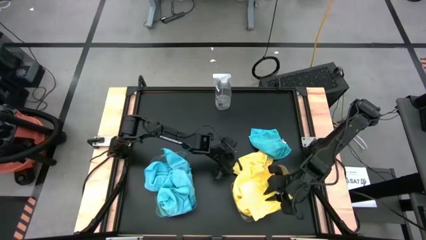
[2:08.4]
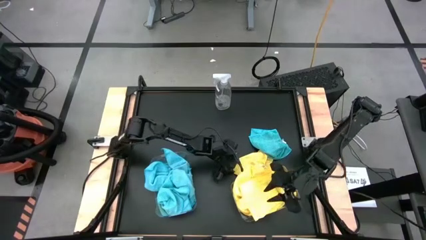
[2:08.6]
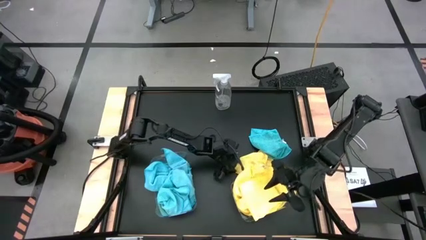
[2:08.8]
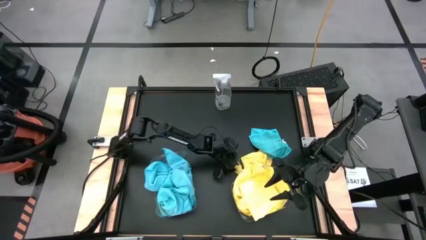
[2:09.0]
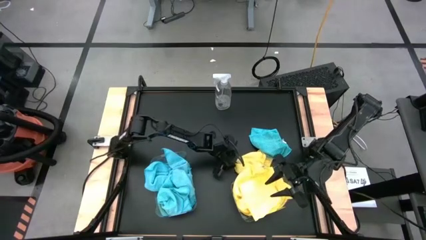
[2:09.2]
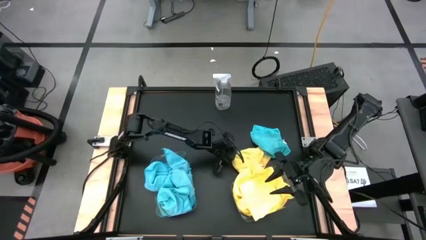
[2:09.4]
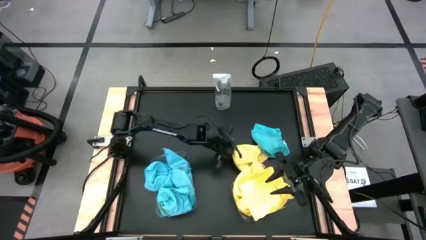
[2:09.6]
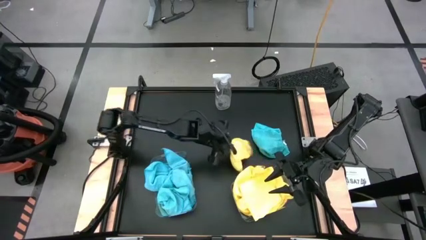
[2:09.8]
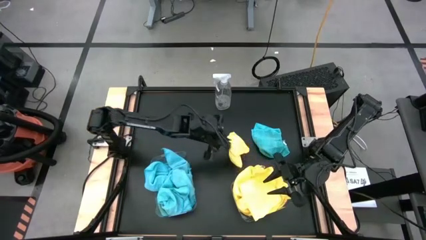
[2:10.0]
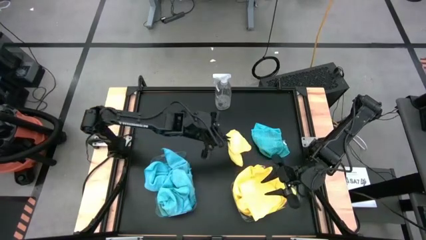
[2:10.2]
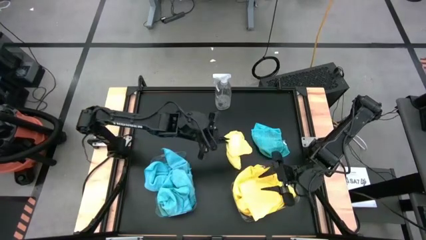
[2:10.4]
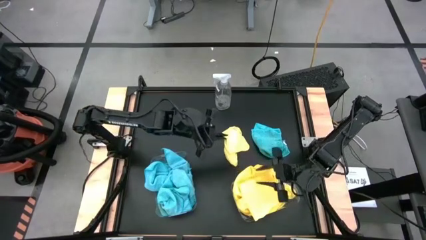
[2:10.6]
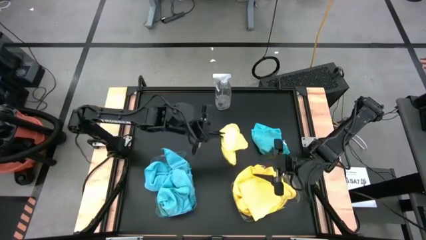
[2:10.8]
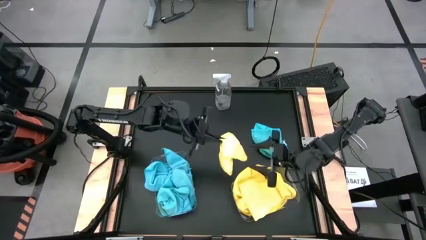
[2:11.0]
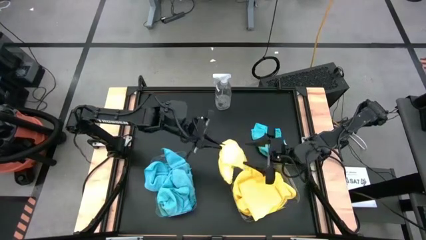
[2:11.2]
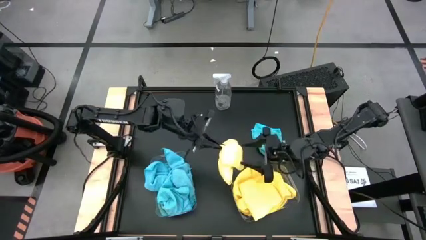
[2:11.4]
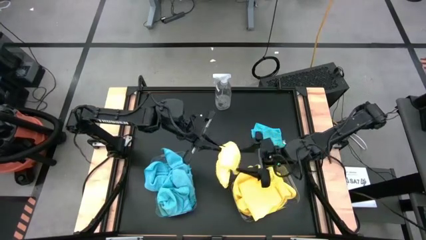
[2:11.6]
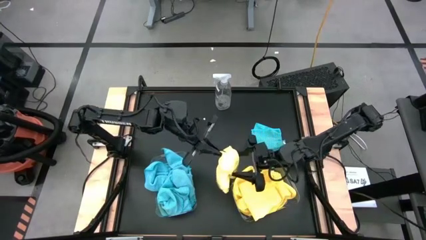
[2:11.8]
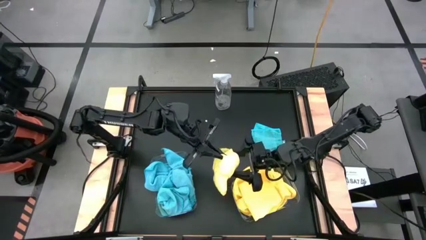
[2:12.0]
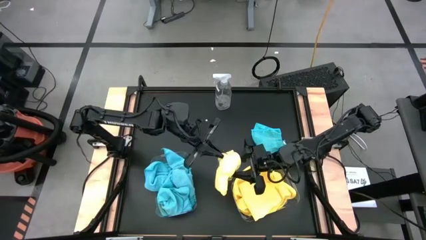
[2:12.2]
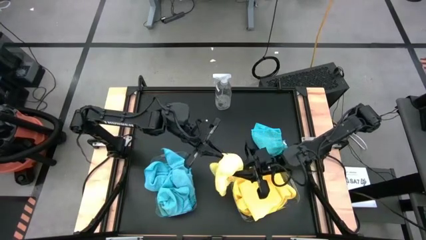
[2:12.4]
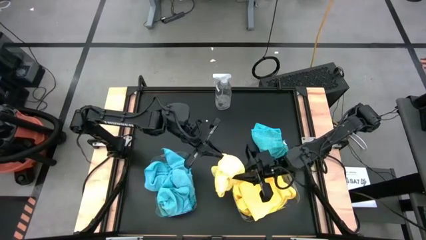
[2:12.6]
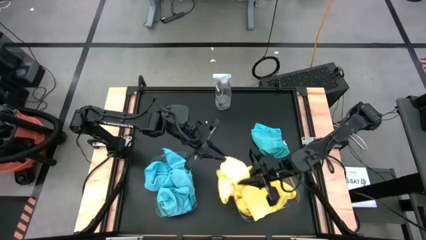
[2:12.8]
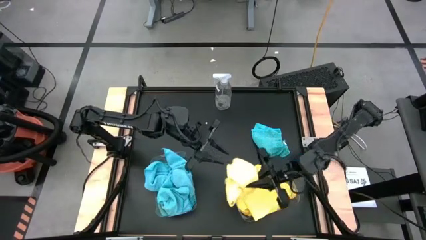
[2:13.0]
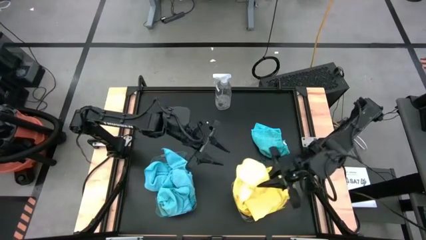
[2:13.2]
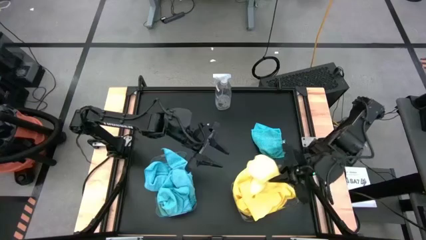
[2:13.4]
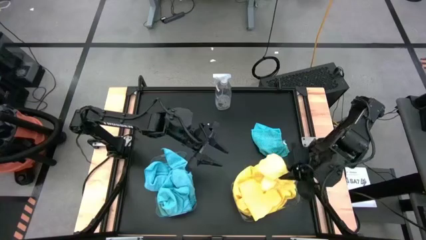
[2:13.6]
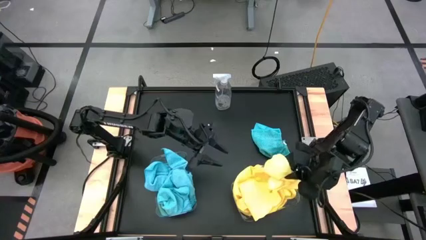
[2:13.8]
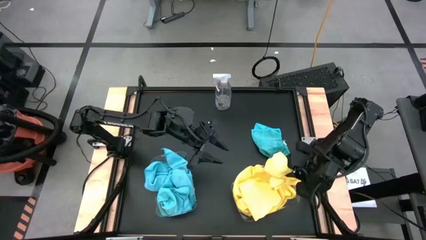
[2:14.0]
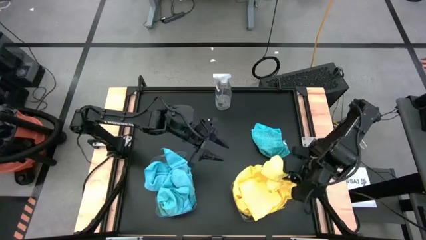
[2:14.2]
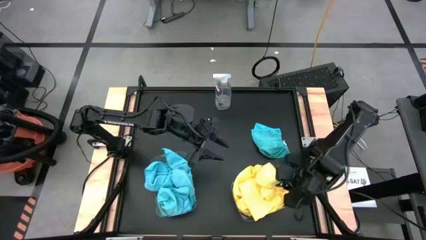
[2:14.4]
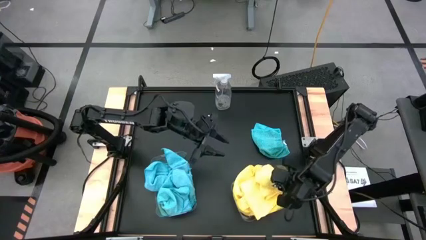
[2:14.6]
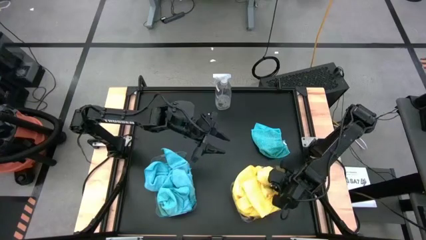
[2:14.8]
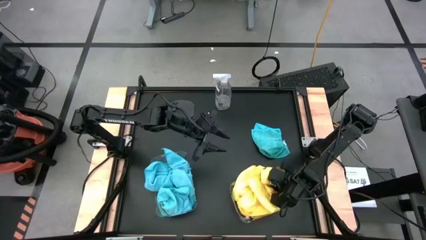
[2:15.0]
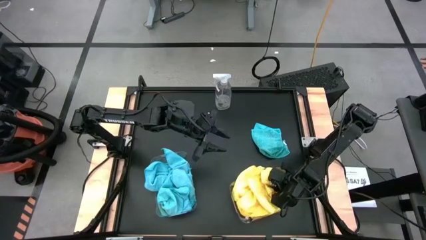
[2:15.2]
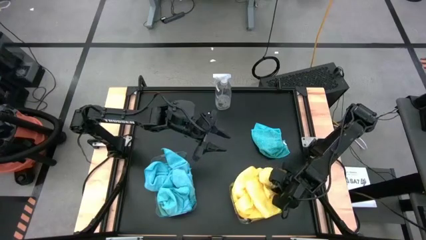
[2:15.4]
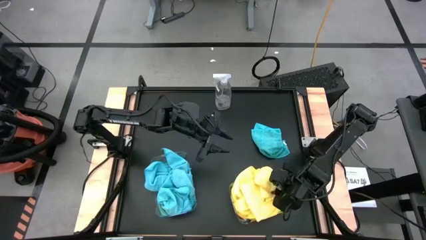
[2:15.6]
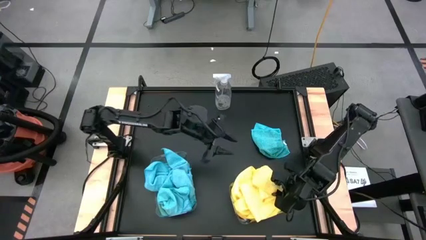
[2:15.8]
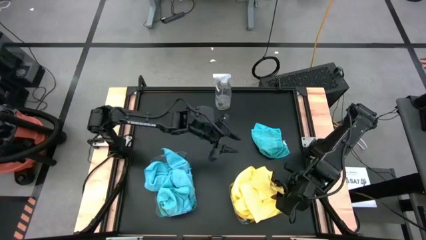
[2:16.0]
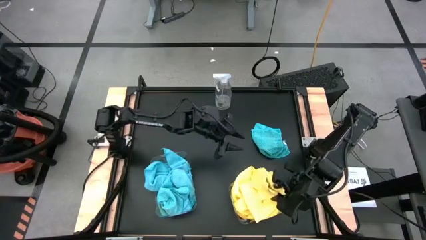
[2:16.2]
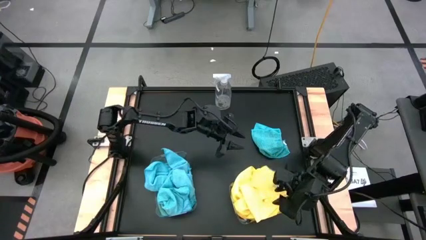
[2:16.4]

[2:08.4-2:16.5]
Task: Sort microfiber towel by color & place in baskets
Put the yellow microfiber towel into the right transparent bin

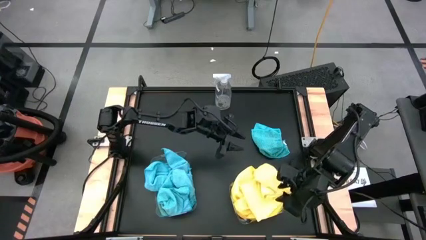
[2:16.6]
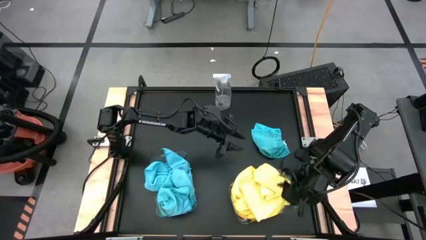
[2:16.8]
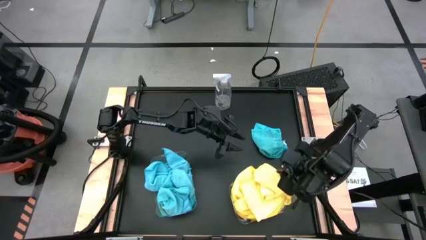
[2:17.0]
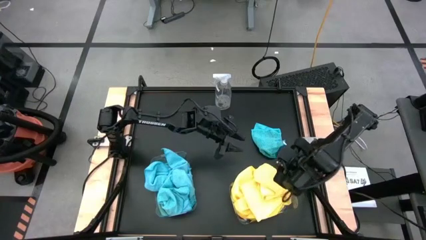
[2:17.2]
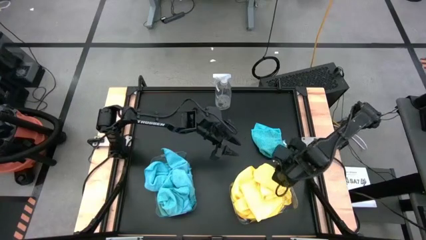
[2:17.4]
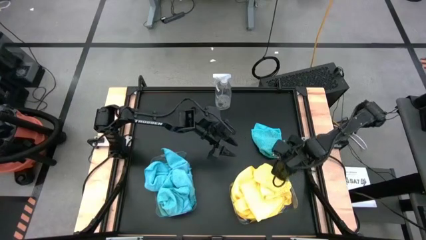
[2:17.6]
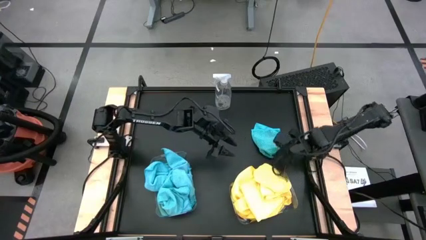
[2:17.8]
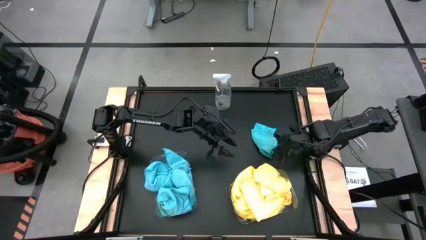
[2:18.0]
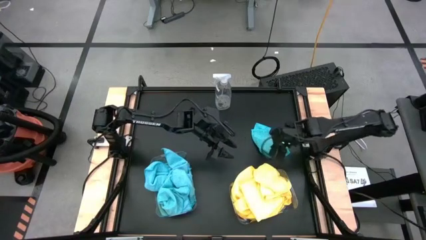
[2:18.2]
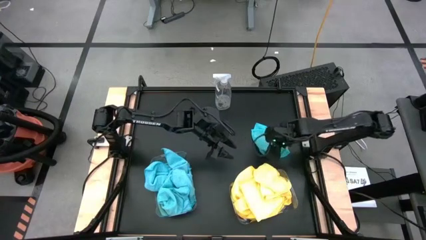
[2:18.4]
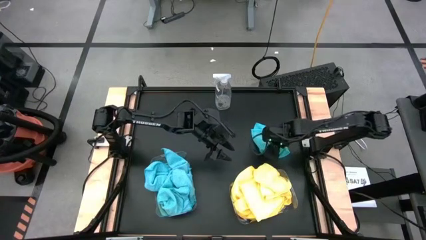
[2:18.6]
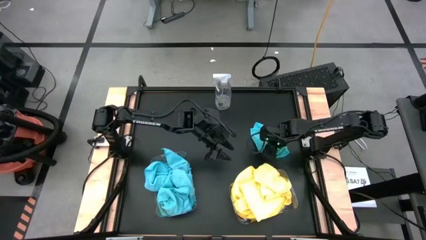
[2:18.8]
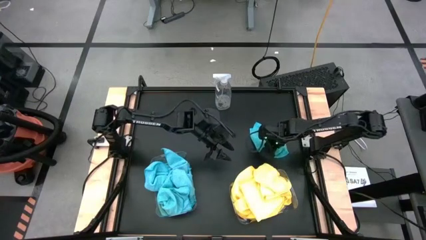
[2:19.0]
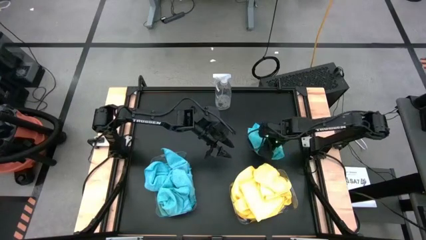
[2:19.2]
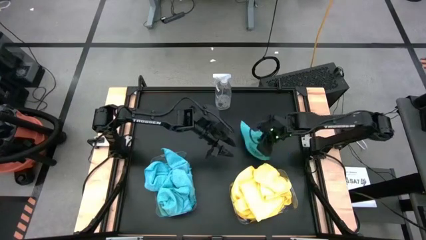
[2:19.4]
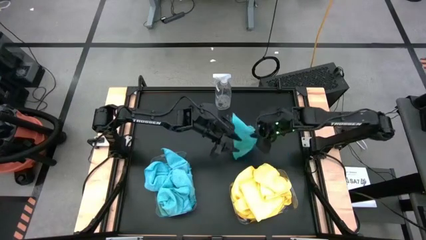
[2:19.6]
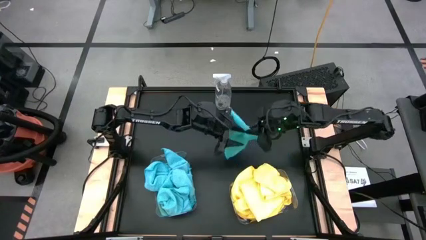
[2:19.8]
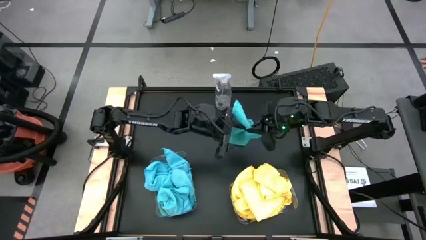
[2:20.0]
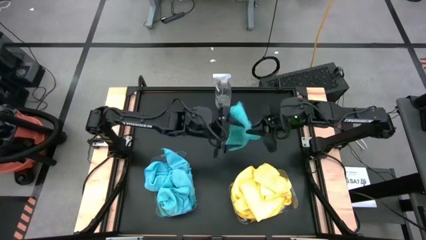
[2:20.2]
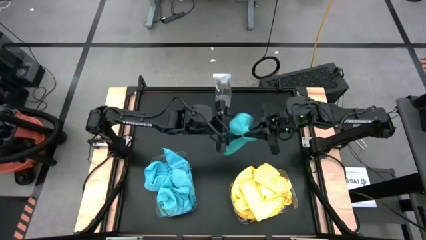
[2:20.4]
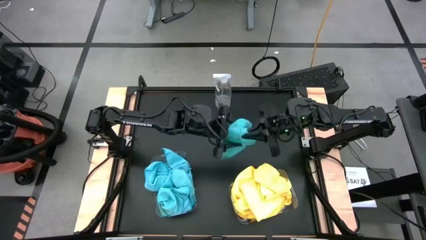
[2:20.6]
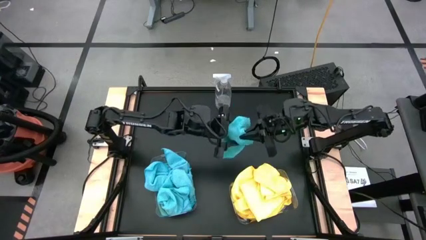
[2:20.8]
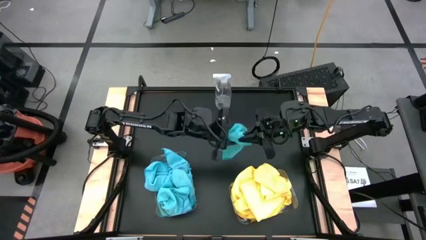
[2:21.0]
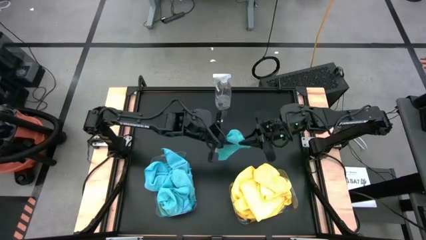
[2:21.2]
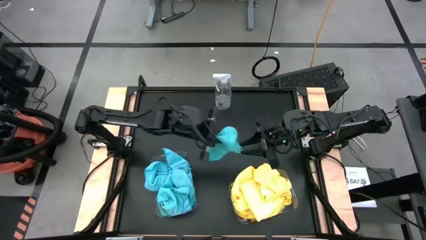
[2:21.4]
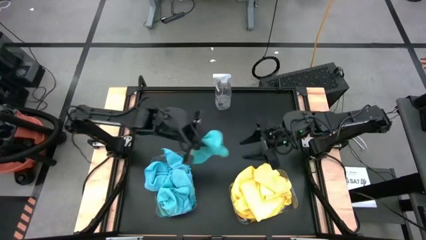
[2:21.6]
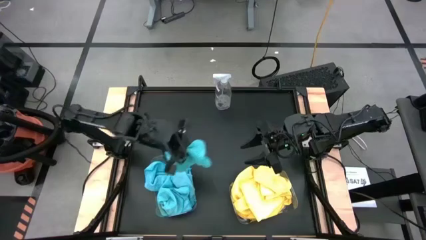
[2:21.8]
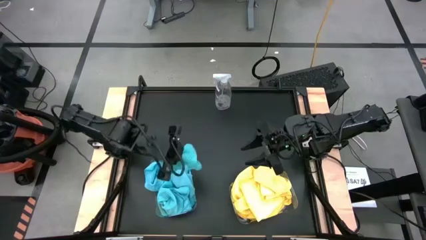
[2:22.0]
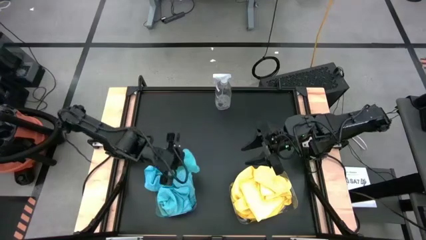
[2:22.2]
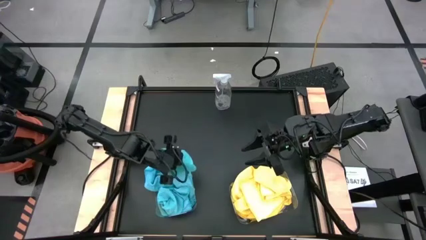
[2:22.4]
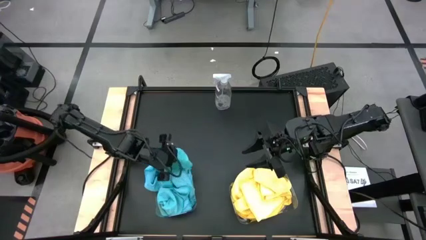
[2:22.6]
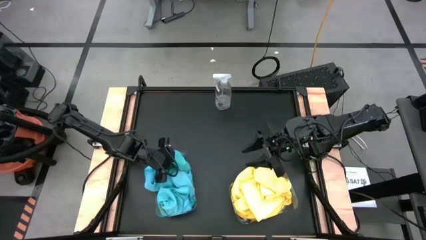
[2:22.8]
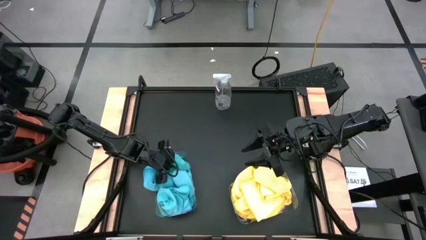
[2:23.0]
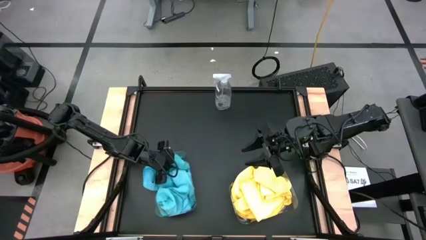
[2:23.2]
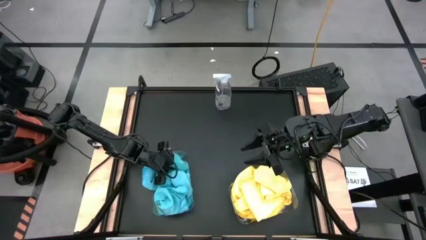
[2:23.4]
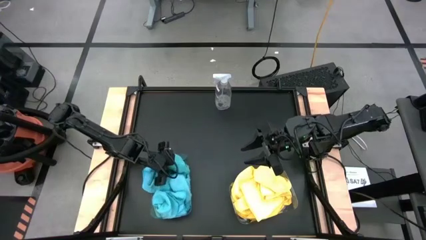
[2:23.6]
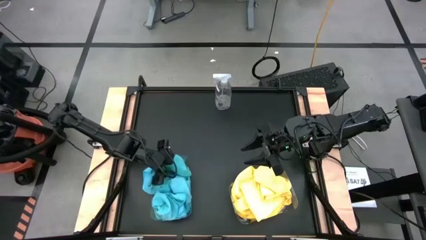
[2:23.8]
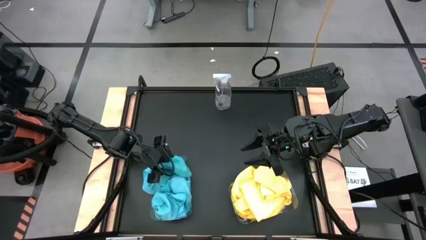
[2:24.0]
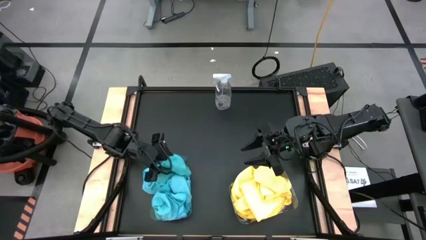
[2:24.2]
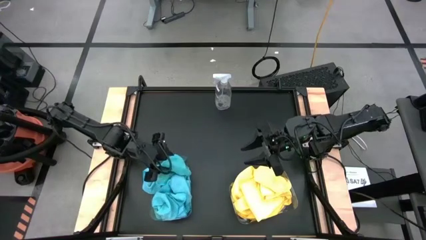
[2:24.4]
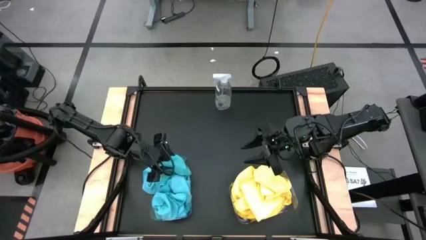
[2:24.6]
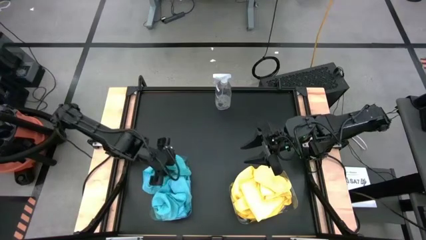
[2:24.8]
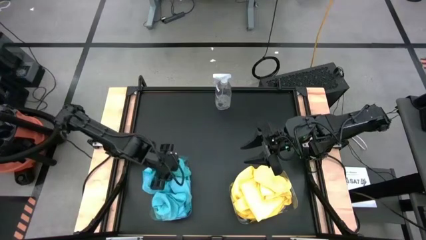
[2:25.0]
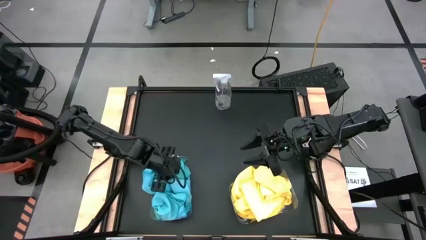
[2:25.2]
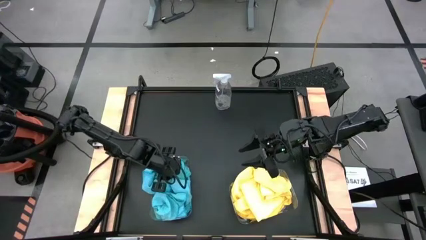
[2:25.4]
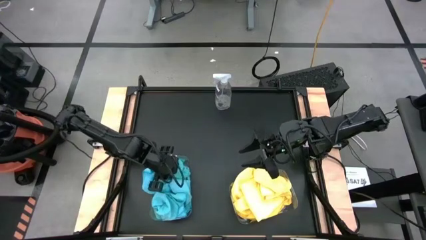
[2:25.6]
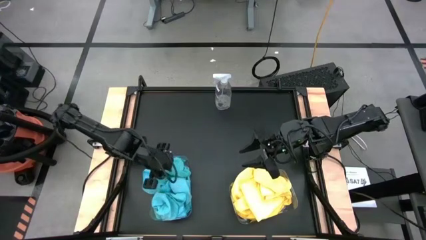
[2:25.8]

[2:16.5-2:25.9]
Put the blue microfiber towel into the left transparent bin
